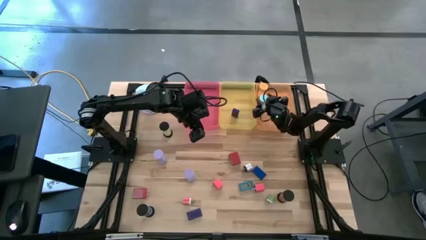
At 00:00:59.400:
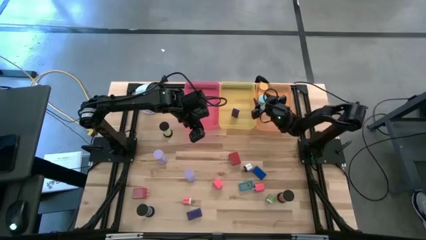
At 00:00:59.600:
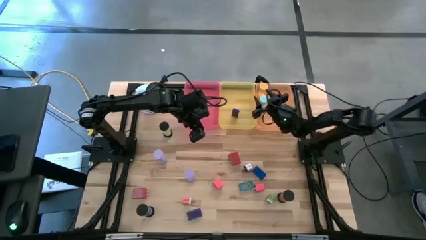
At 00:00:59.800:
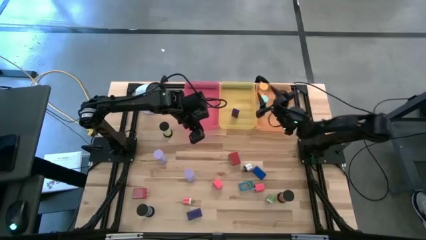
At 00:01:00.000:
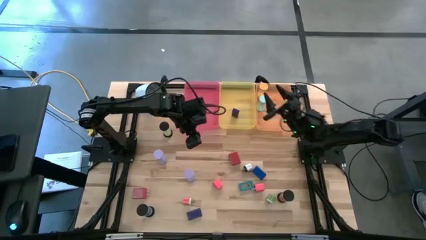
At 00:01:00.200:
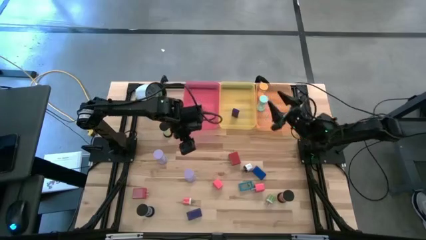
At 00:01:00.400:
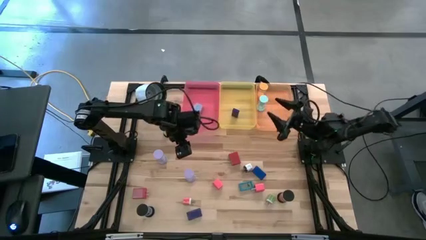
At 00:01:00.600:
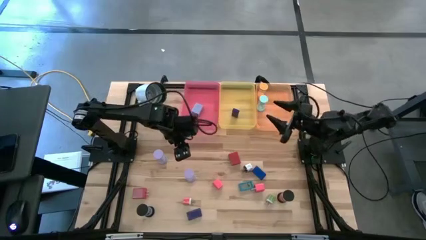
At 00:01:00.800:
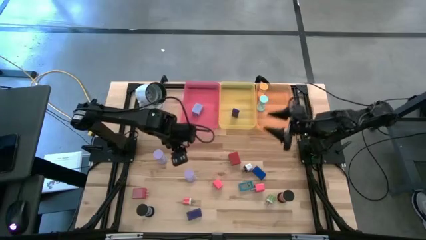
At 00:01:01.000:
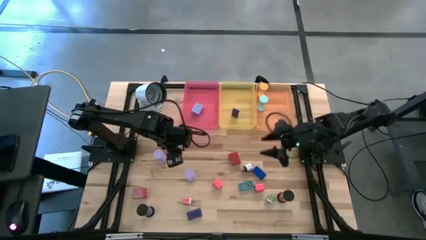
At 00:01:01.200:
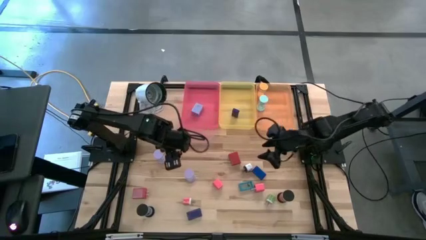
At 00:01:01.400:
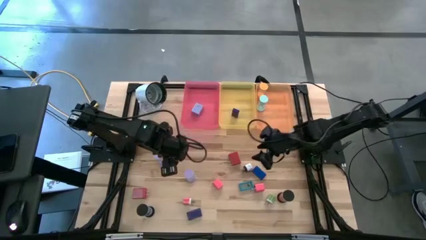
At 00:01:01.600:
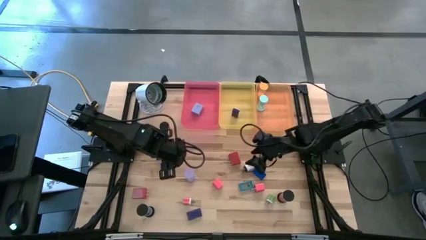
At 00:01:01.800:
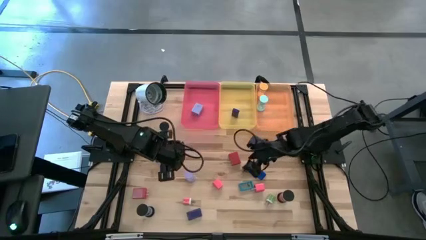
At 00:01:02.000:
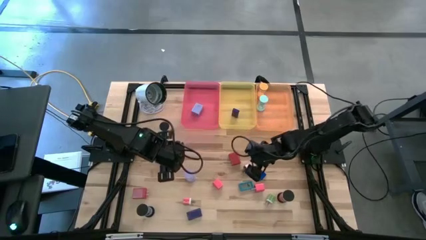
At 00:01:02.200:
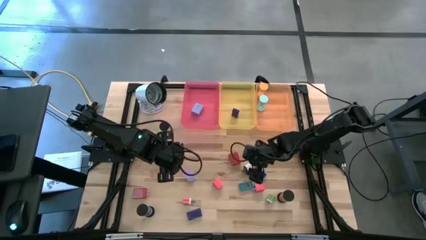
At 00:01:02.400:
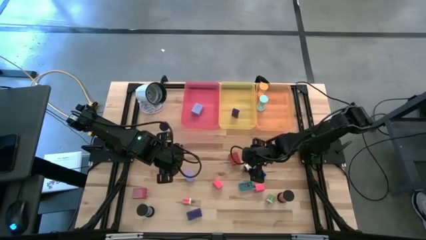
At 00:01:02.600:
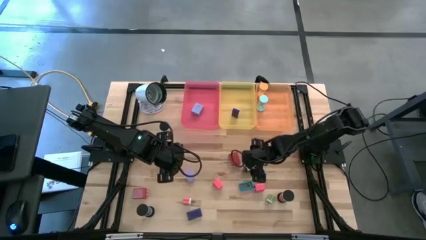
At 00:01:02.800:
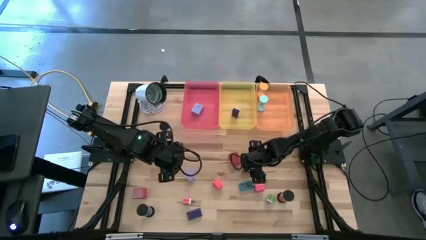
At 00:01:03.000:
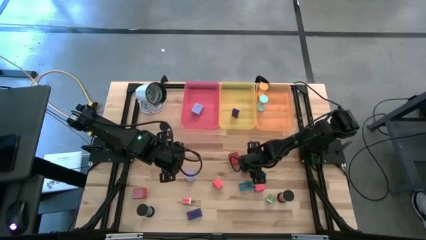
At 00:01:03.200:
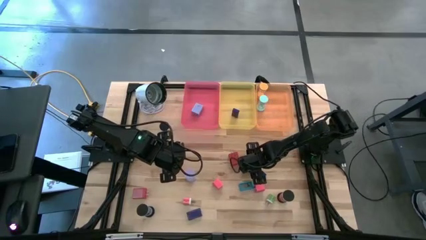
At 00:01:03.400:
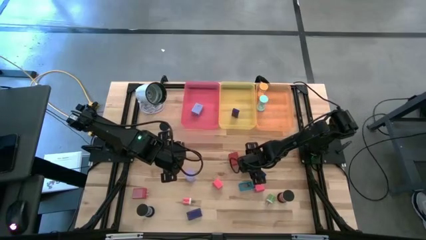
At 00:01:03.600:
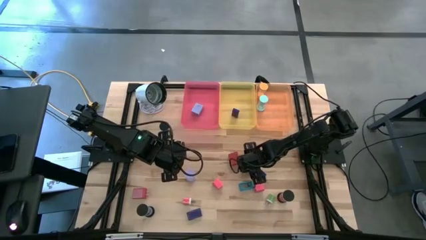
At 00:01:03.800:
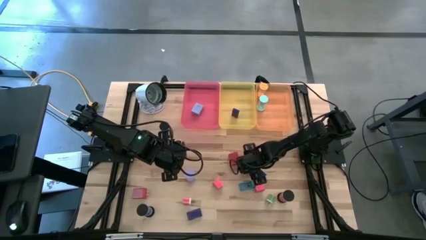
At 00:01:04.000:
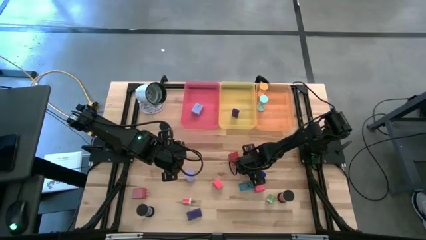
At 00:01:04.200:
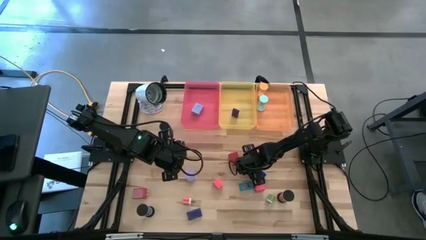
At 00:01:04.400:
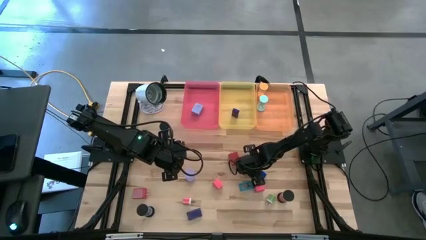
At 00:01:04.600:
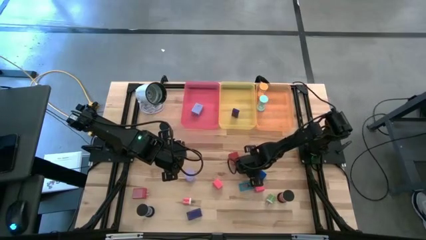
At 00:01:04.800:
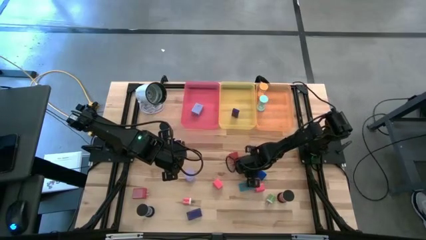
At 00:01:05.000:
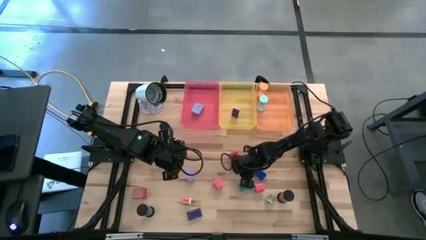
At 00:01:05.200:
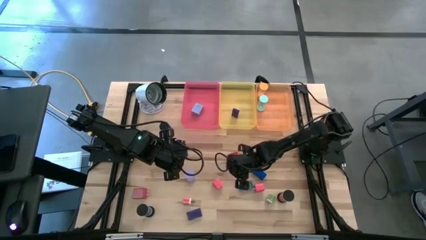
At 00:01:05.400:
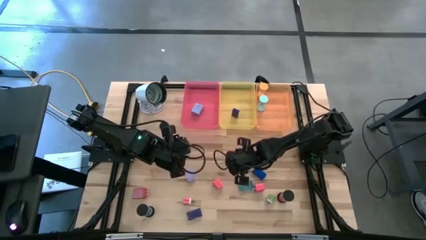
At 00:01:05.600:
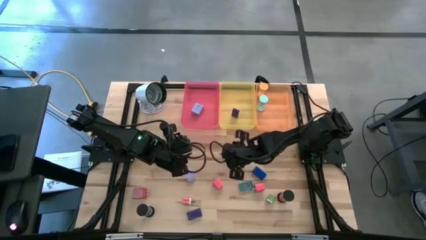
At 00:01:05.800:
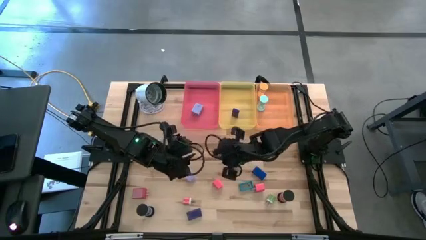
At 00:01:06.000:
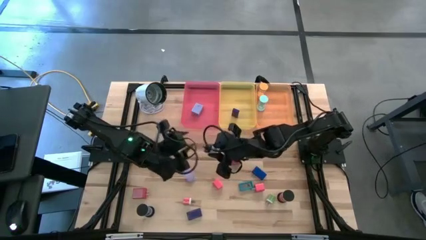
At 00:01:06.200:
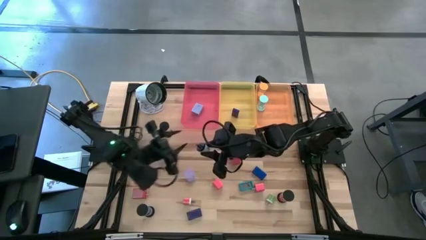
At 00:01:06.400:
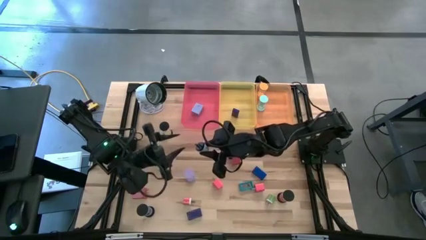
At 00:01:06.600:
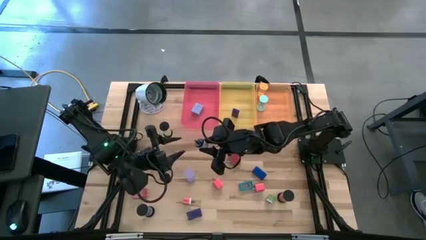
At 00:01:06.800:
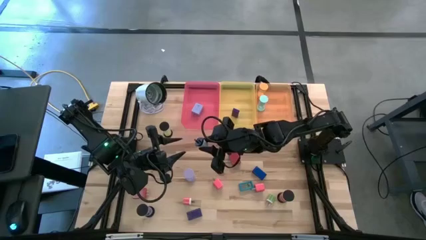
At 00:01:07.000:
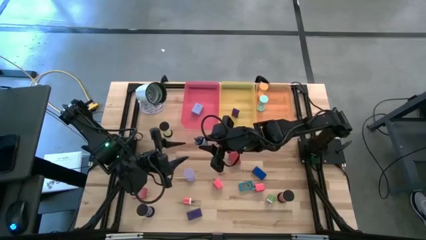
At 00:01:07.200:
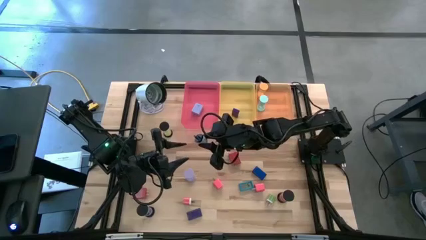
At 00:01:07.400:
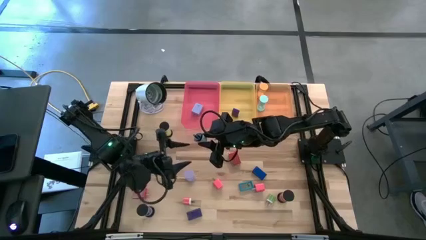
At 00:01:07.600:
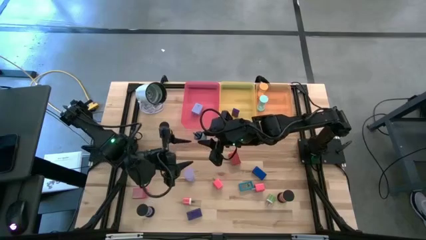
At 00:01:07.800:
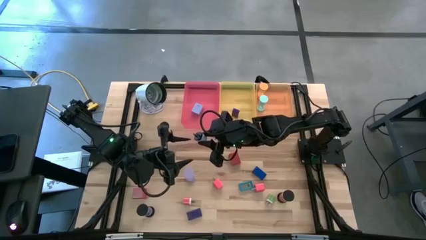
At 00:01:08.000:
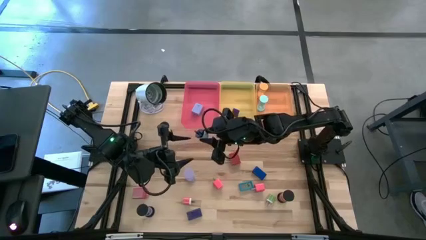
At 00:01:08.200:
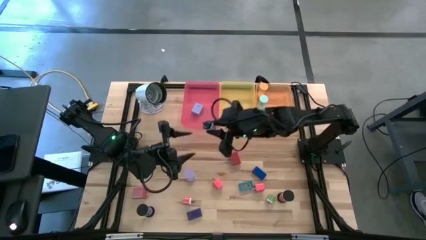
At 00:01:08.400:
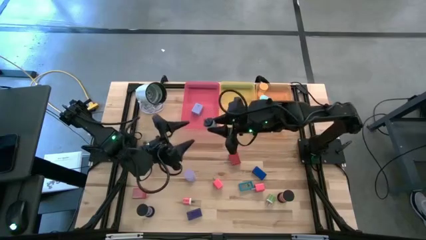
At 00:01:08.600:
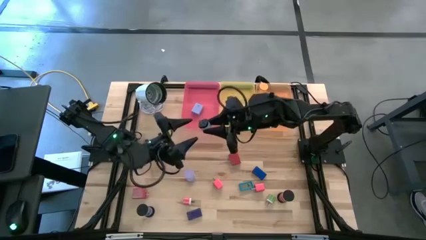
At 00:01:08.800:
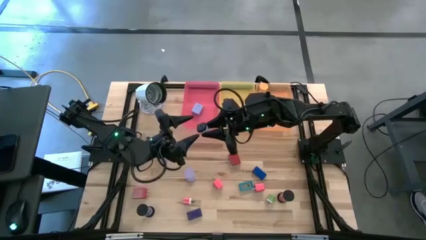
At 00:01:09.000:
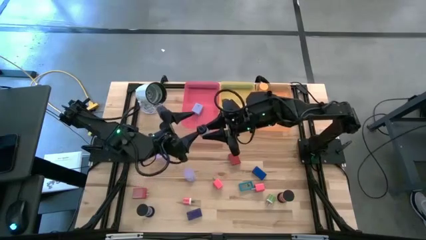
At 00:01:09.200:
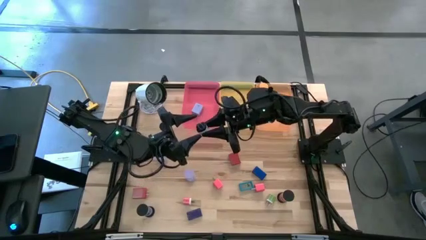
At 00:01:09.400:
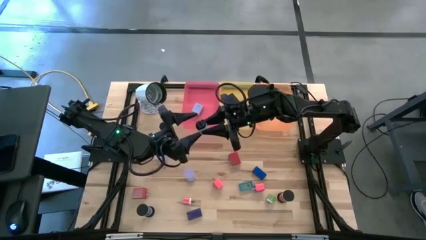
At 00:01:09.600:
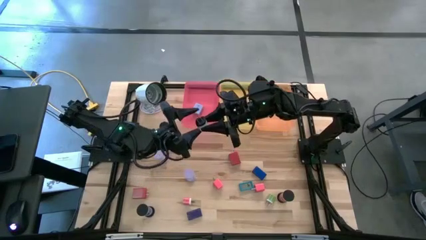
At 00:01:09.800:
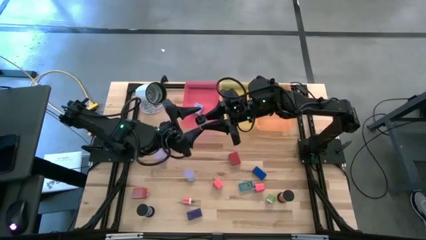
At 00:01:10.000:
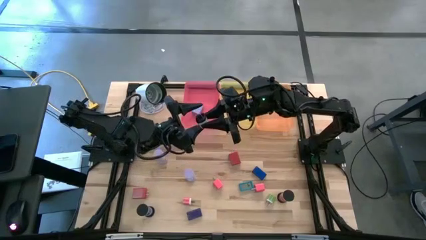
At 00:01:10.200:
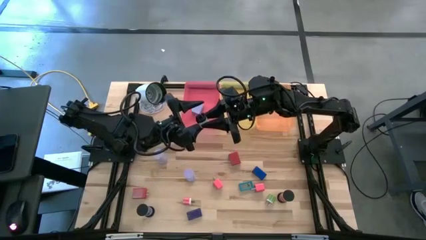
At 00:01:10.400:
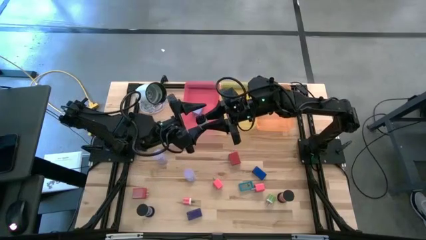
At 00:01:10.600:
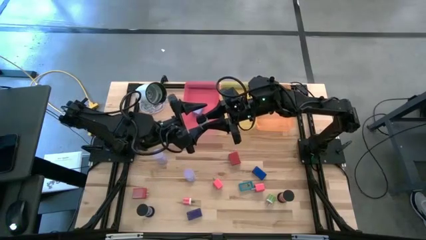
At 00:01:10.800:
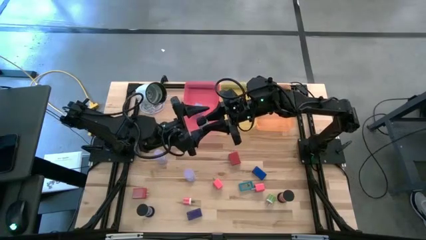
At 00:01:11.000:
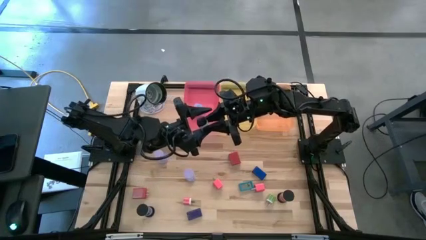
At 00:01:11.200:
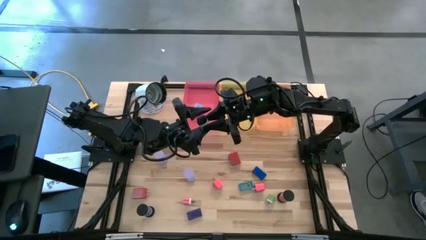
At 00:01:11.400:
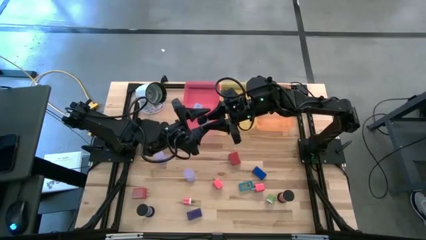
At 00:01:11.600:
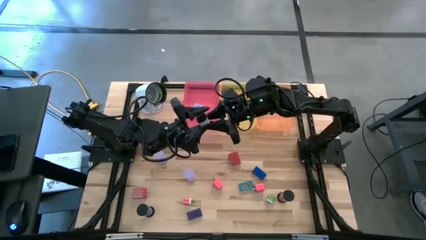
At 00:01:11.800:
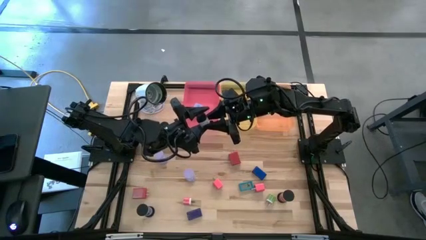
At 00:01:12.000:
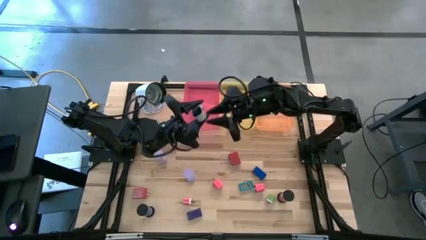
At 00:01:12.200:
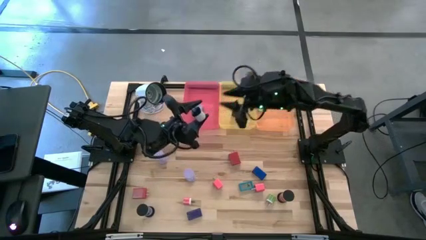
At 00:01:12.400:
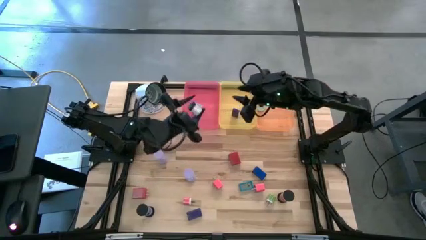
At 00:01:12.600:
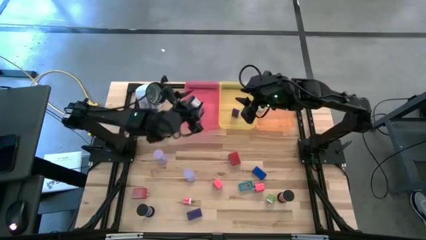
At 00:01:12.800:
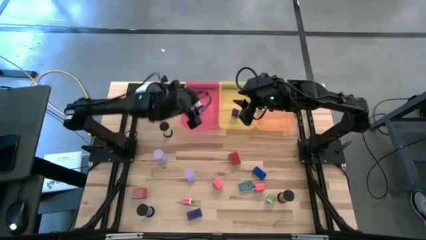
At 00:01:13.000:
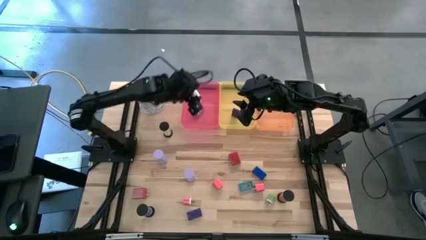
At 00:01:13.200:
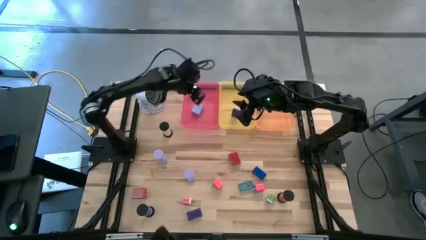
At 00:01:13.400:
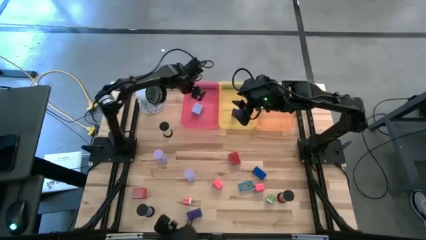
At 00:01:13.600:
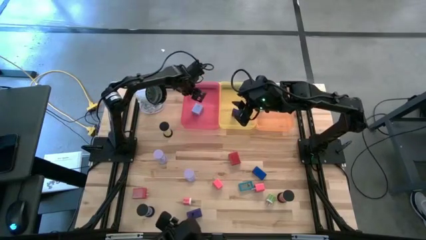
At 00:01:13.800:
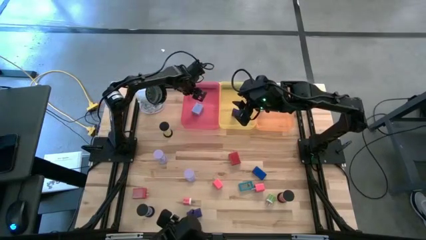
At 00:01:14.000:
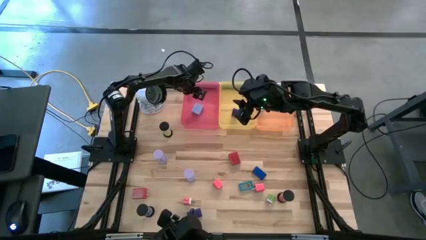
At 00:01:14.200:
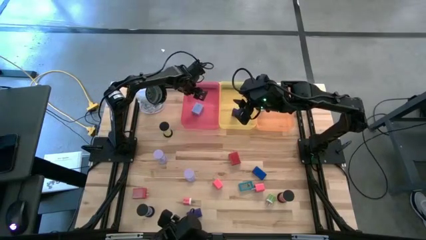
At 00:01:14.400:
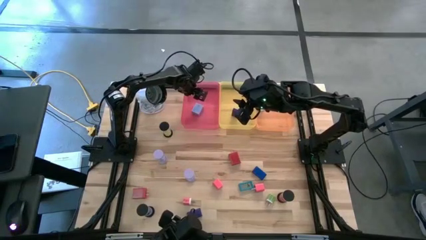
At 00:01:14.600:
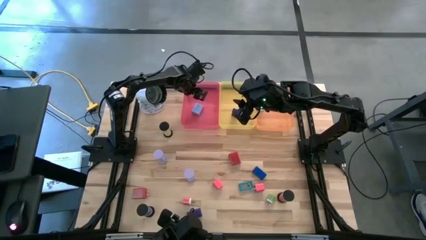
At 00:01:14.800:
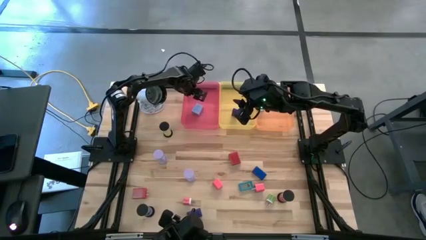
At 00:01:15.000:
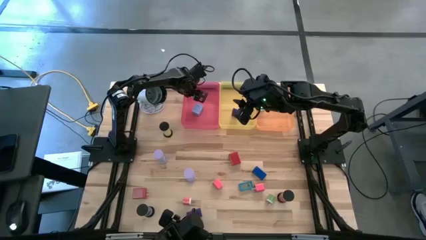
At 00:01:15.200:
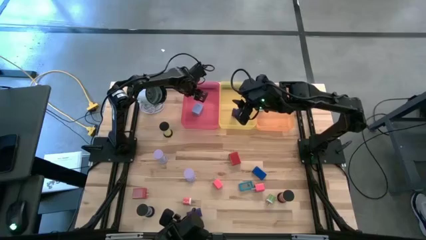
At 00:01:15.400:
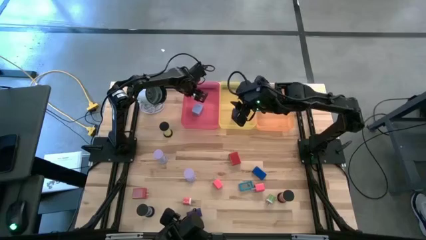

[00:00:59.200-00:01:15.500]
Task: Pick & Place Office items
Put the white black charger adapter into the red bin
